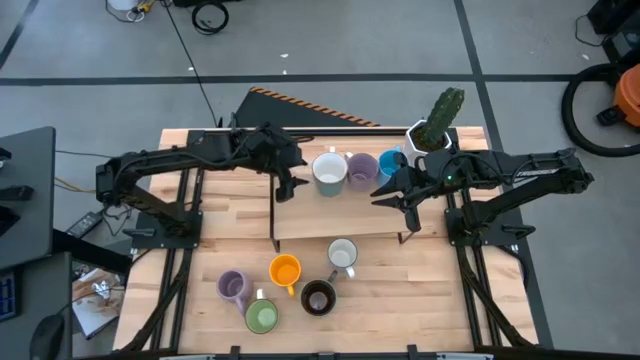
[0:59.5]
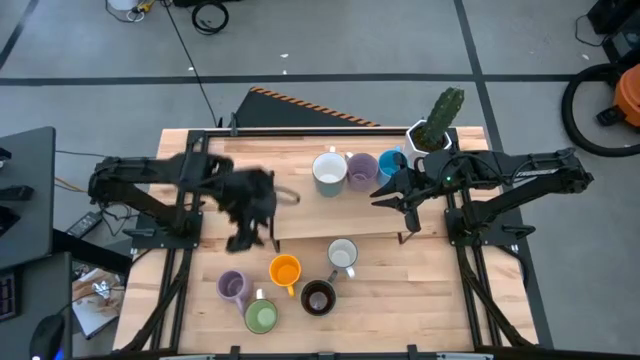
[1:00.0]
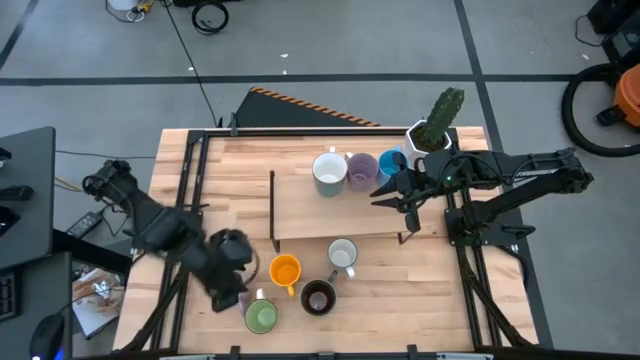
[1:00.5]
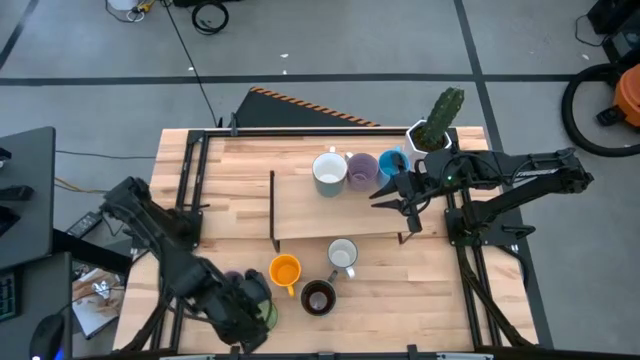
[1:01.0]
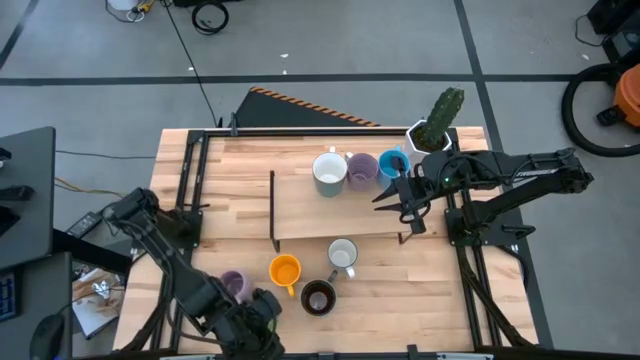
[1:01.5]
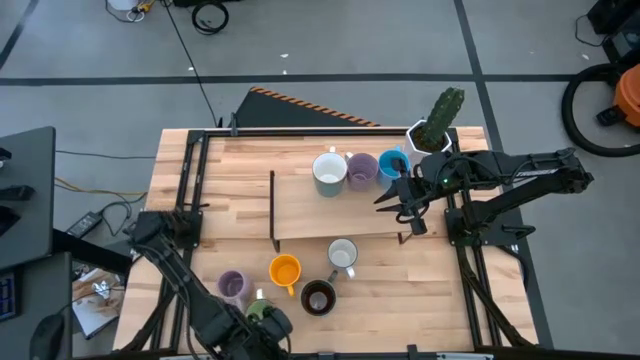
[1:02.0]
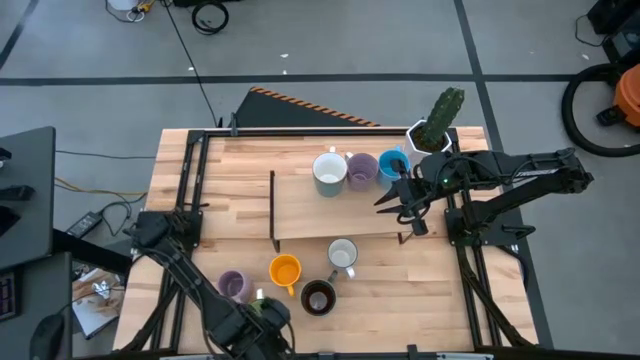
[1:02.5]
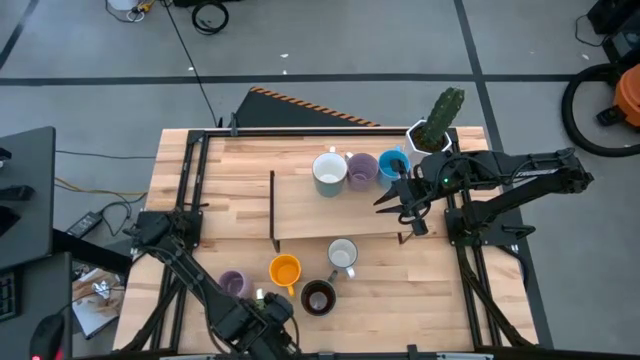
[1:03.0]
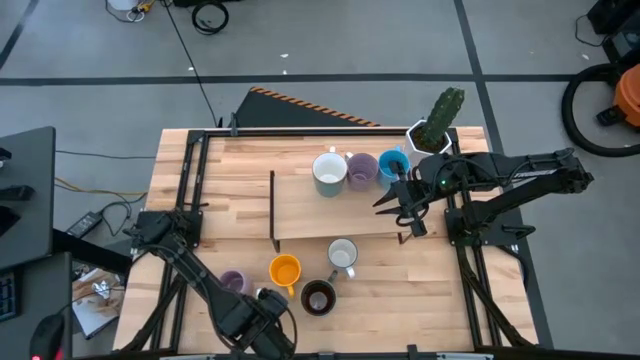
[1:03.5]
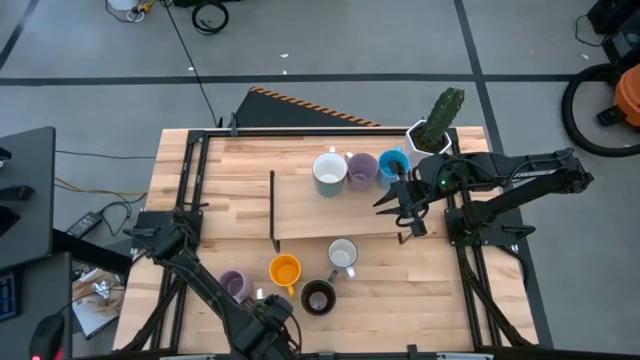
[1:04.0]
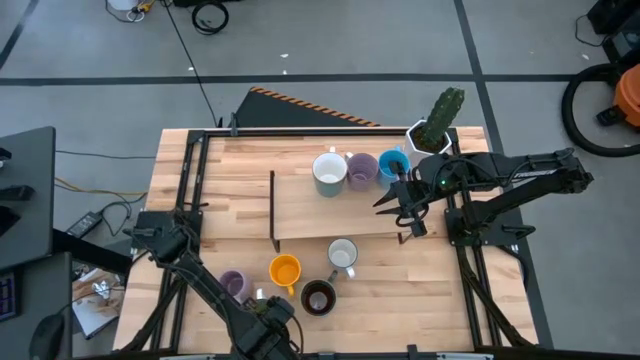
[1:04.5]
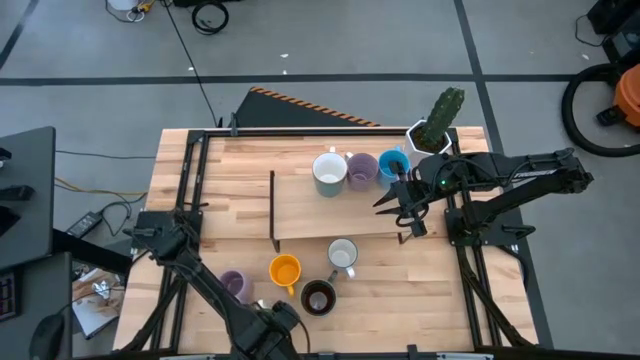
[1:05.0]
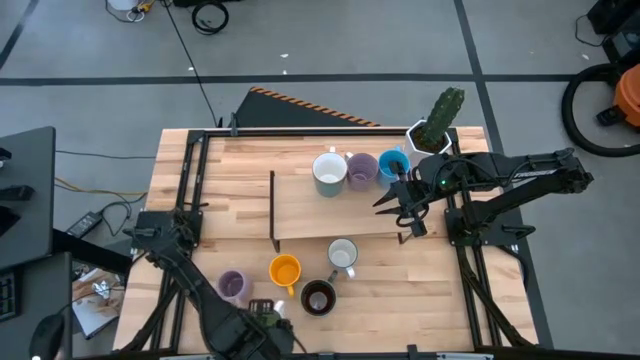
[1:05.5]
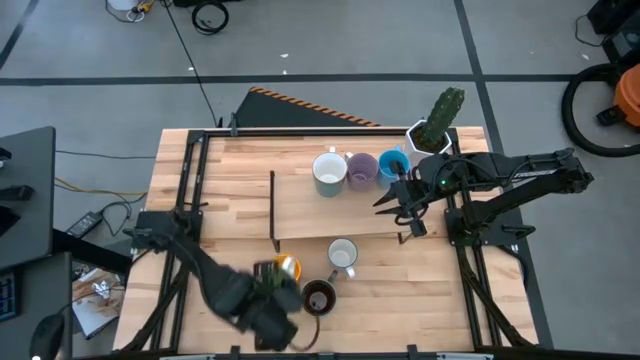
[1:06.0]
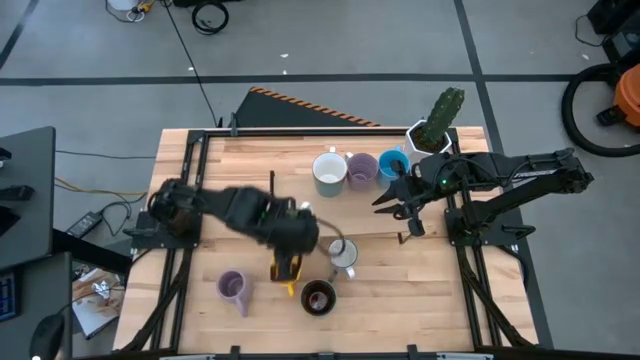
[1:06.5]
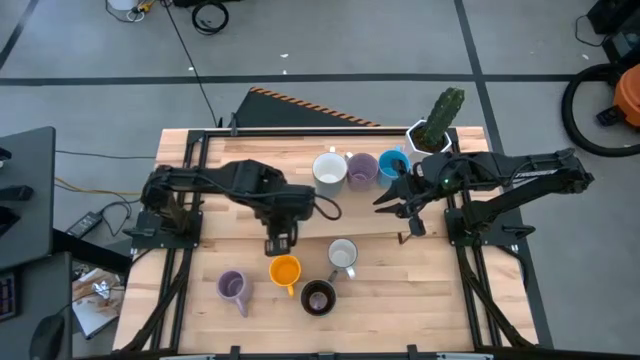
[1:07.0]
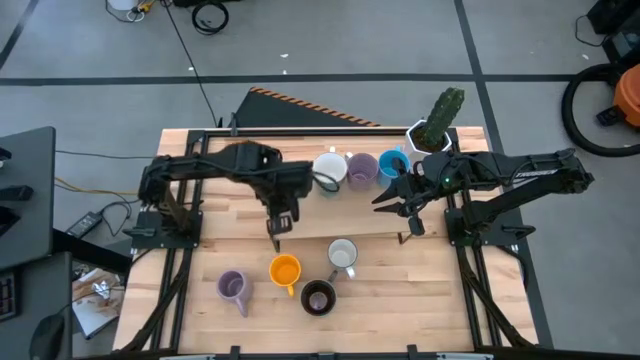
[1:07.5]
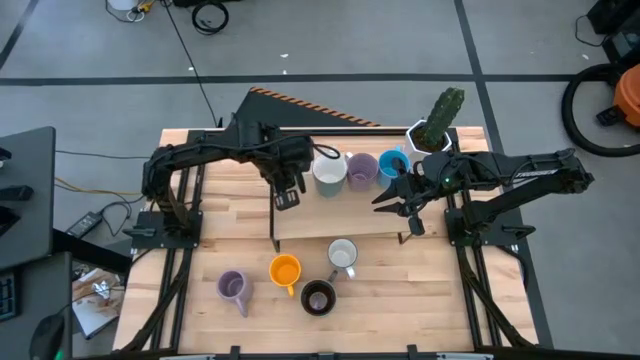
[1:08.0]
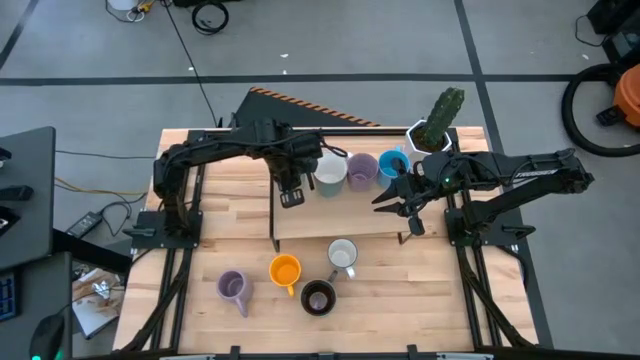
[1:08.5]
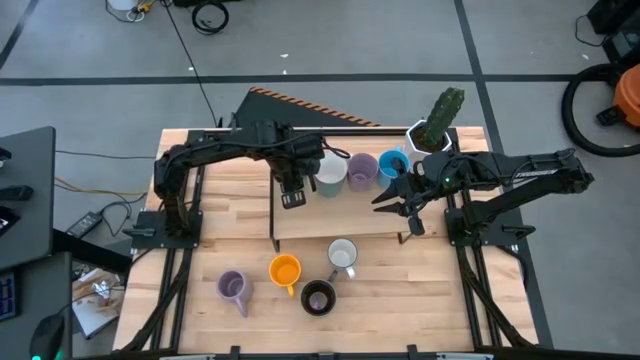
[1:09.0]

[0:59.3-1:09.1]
Task: Place coffee mugs
Put the green cup on the shelf

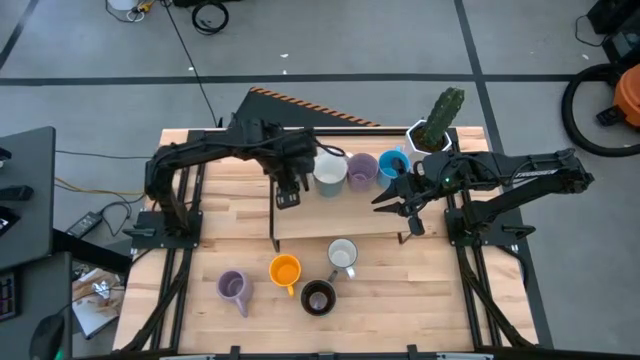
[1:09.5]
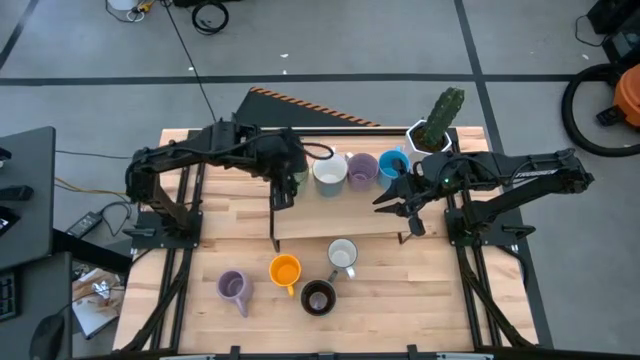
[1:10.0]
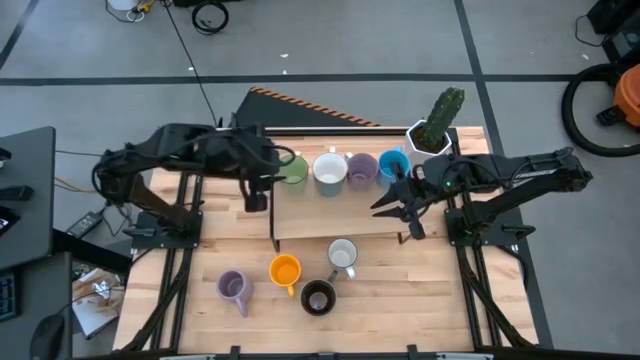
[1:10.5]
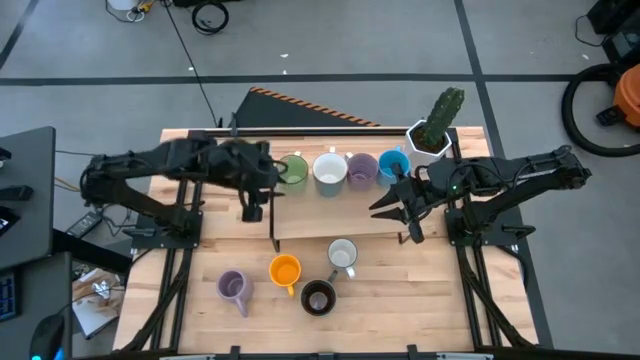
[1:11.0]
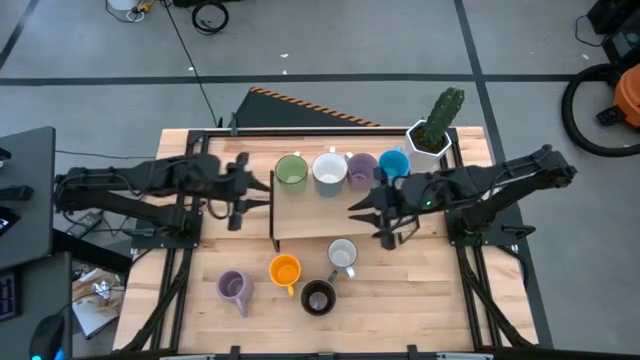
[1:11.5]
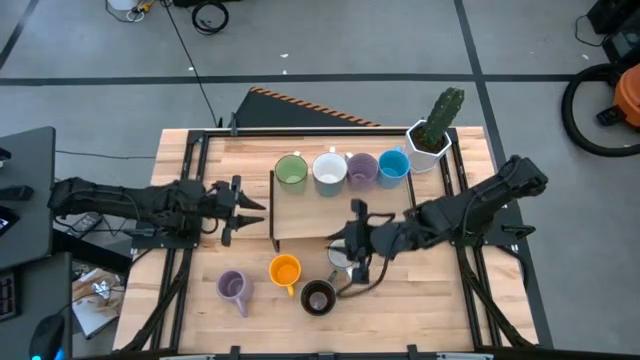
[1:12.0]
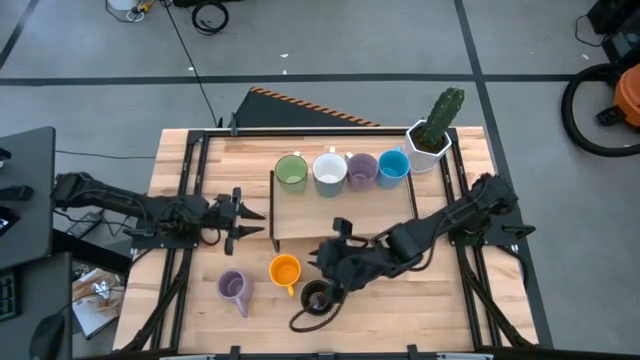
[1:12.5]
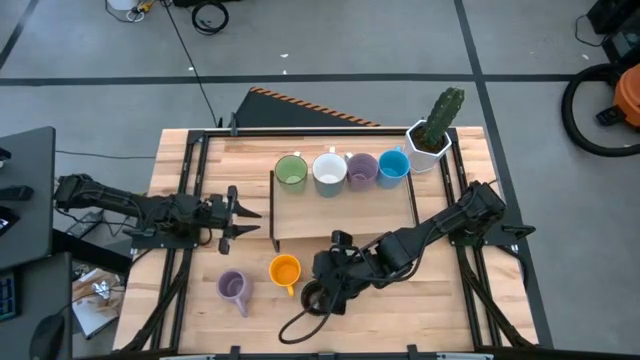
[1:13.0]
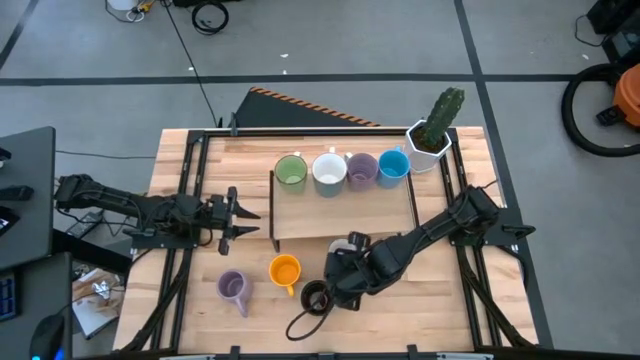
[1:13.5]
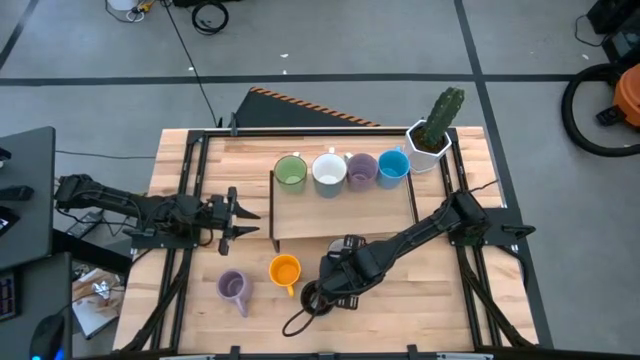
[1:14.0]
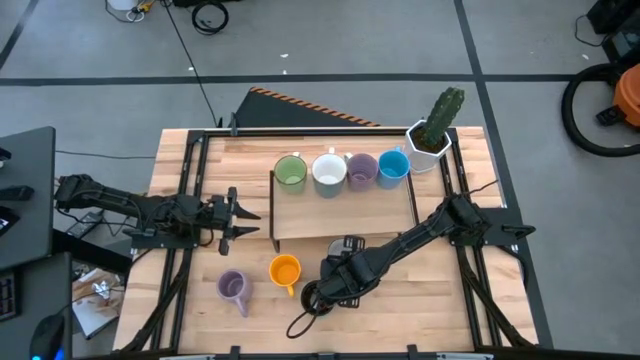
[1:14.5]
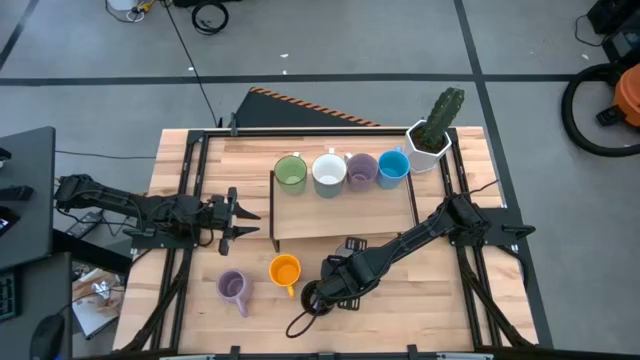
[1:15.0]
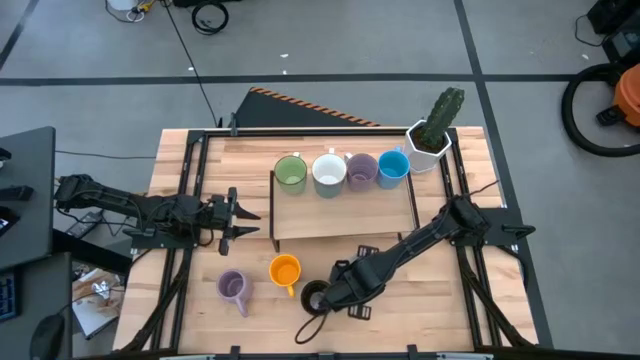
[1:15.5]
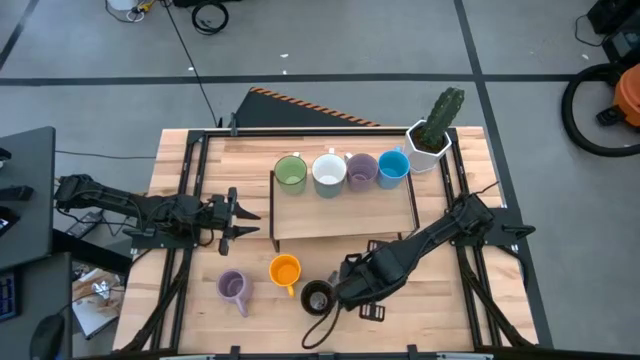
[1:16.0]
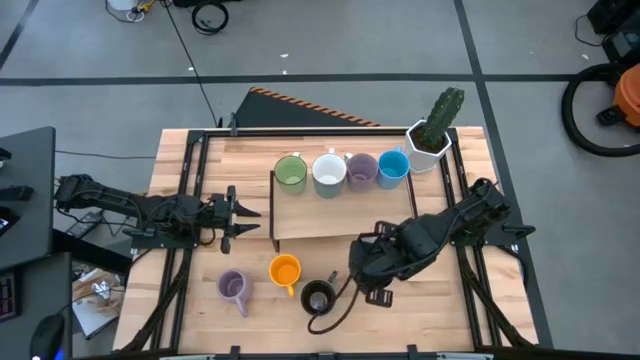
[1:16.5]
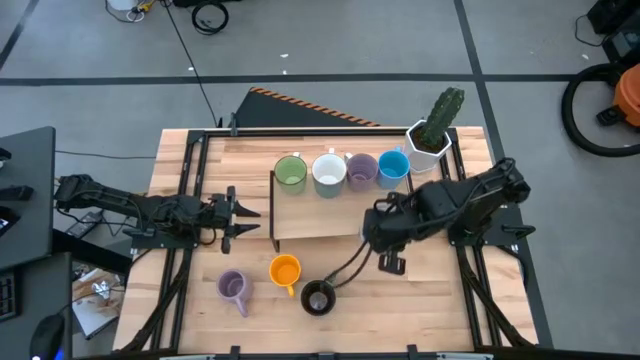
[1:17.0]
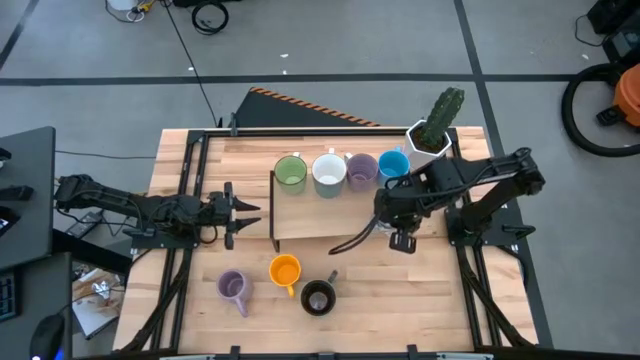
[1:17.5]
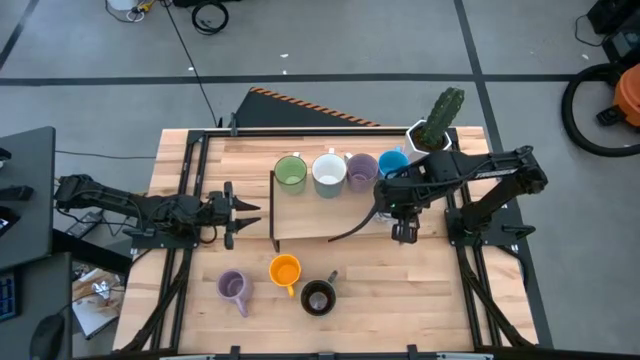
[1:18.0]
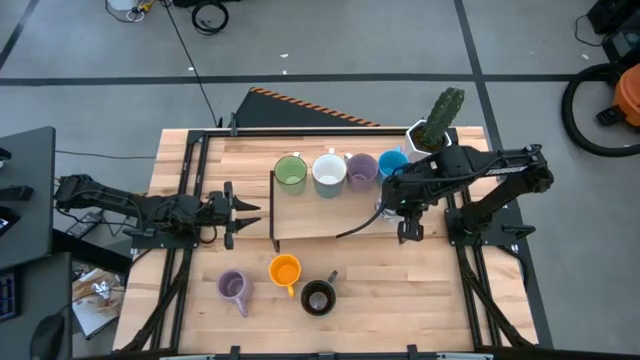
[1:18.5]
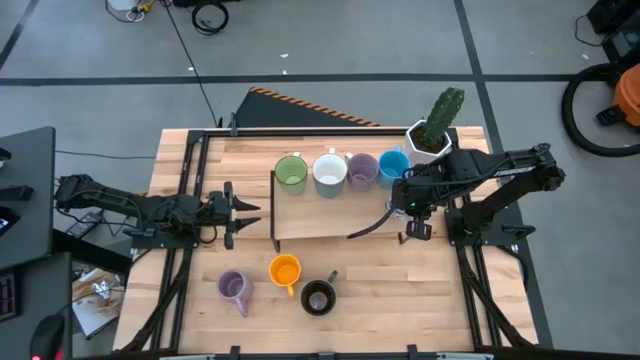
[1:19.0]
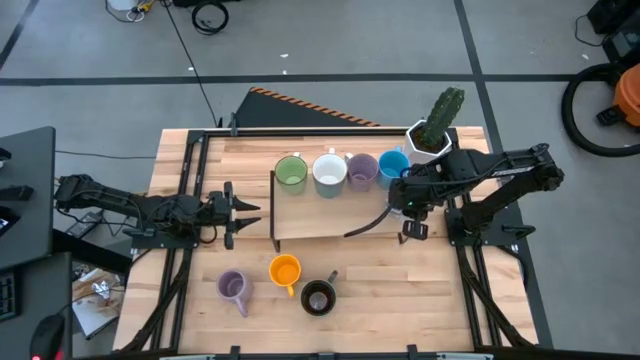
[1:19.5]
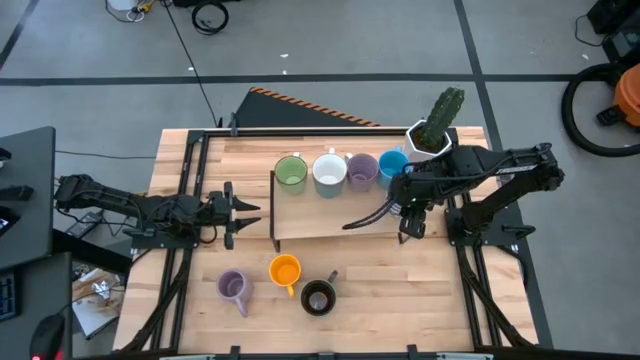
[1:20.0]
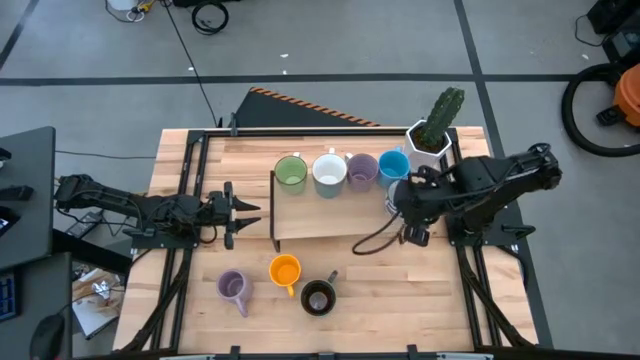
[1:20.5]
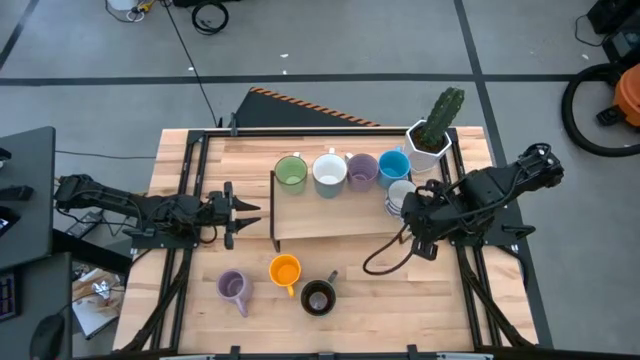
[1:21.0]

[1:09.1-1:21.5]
Put the white and blue cup on the shelf aligned with the other blue cup
